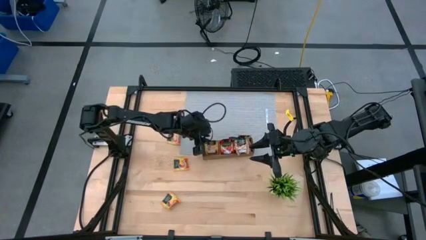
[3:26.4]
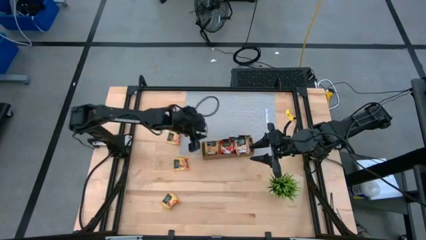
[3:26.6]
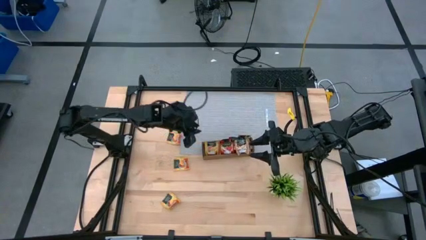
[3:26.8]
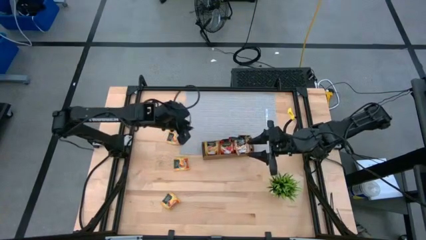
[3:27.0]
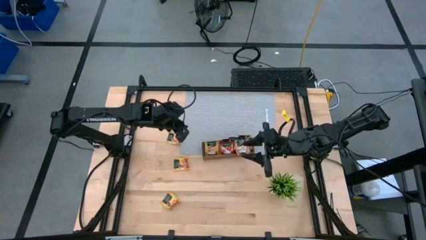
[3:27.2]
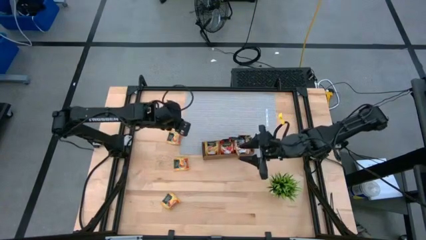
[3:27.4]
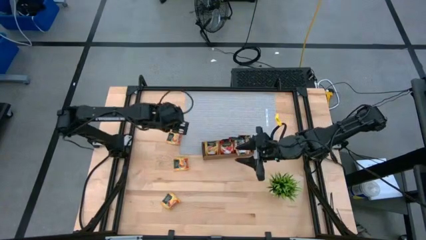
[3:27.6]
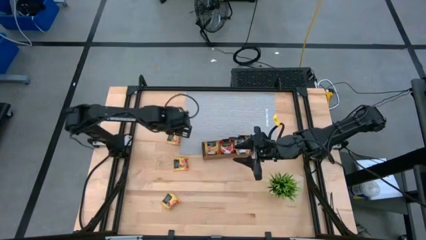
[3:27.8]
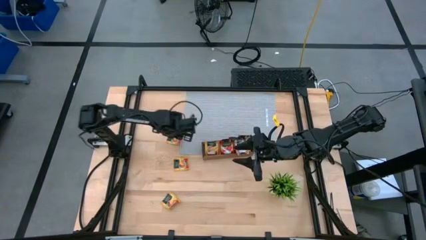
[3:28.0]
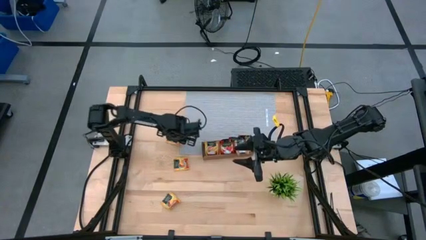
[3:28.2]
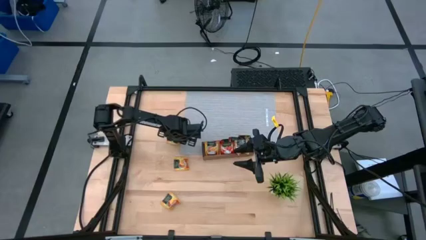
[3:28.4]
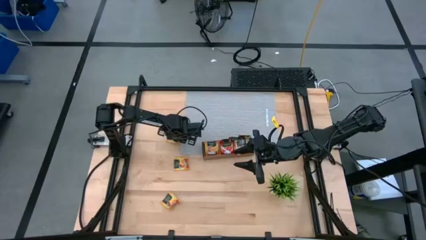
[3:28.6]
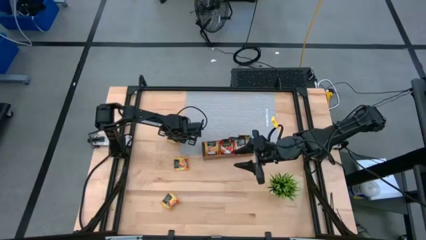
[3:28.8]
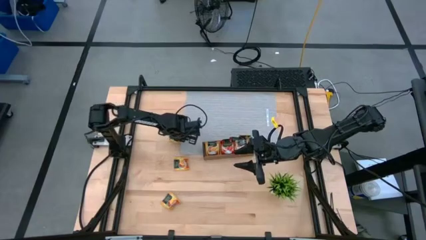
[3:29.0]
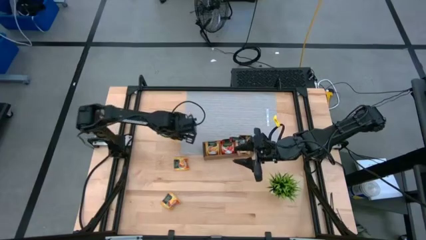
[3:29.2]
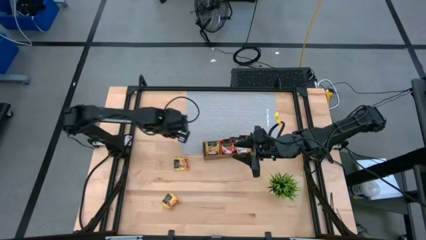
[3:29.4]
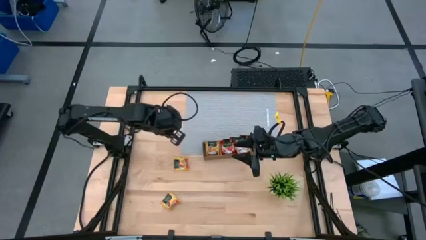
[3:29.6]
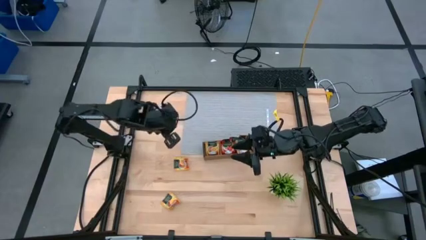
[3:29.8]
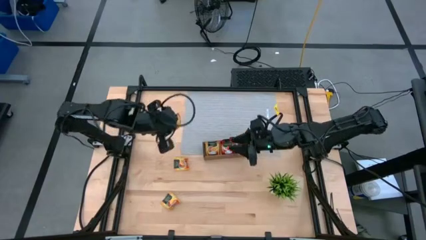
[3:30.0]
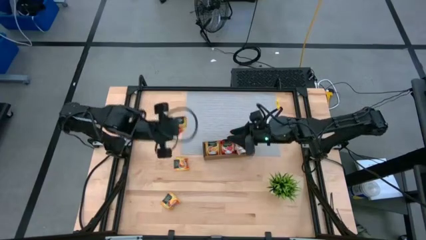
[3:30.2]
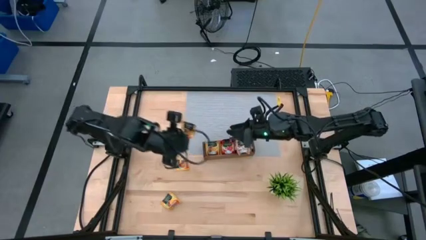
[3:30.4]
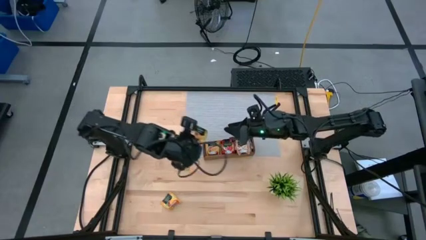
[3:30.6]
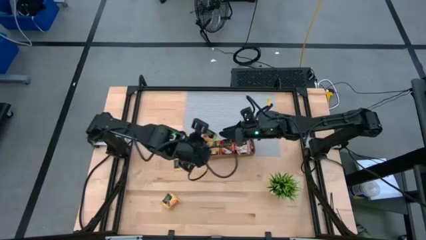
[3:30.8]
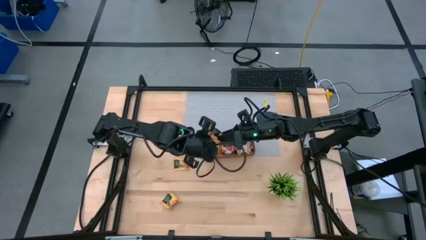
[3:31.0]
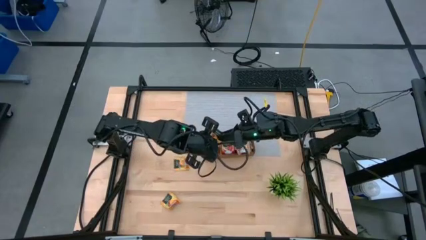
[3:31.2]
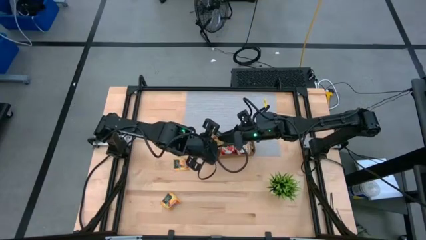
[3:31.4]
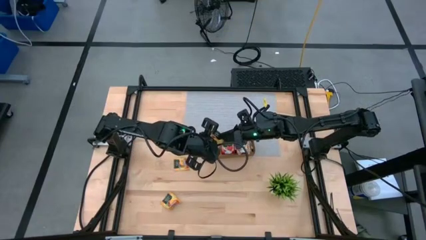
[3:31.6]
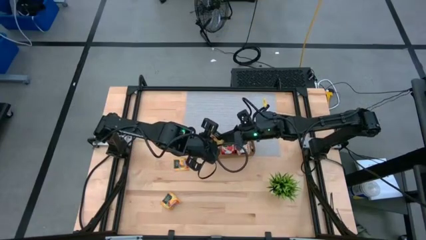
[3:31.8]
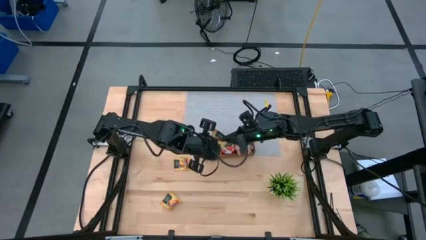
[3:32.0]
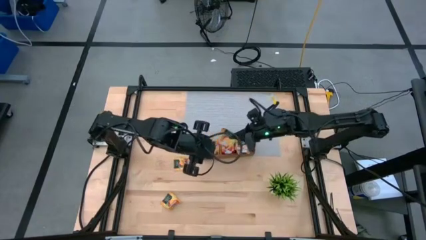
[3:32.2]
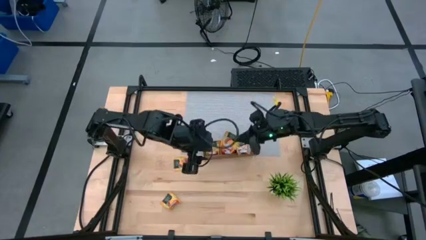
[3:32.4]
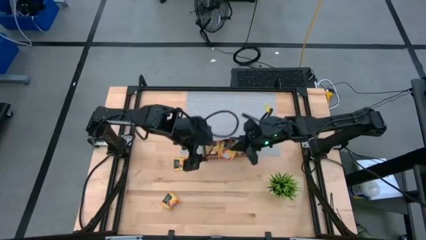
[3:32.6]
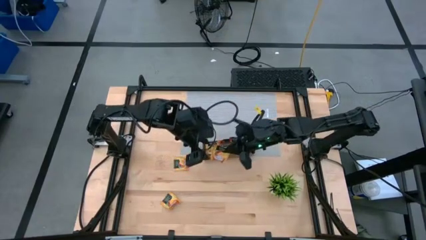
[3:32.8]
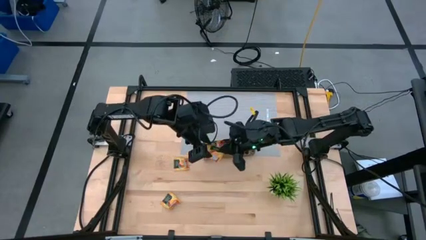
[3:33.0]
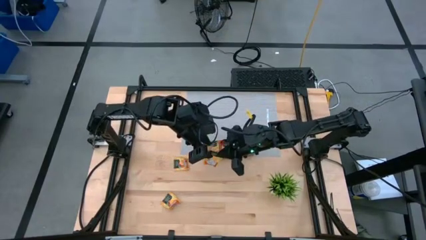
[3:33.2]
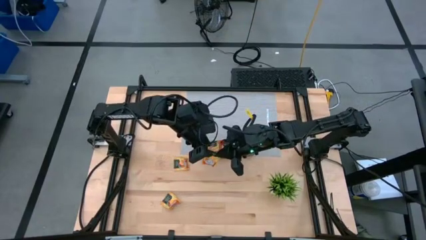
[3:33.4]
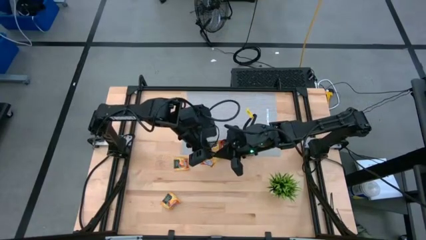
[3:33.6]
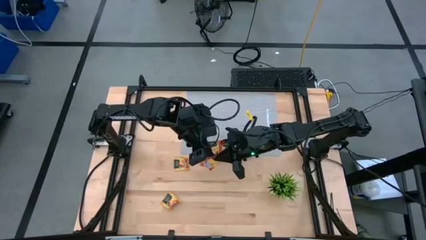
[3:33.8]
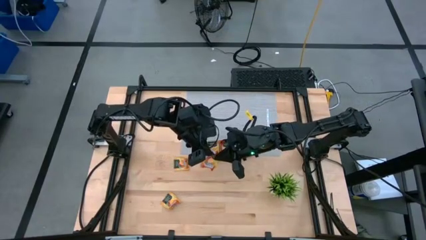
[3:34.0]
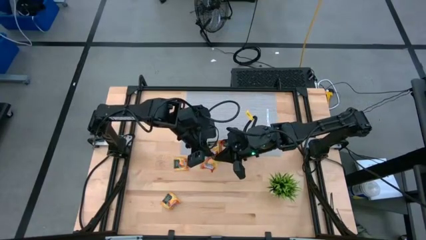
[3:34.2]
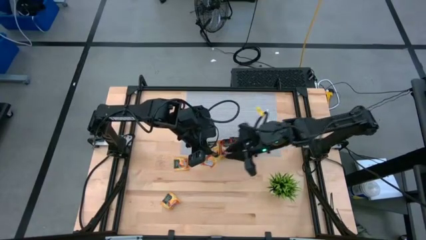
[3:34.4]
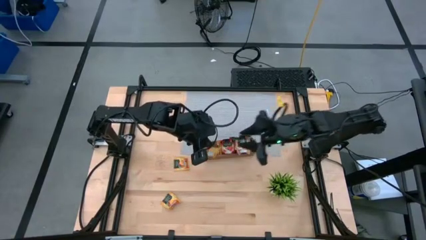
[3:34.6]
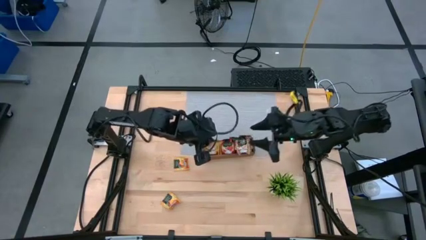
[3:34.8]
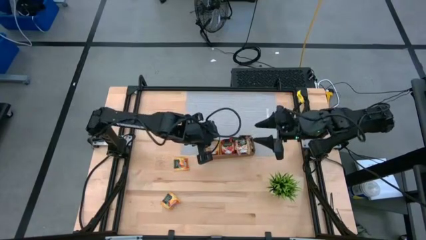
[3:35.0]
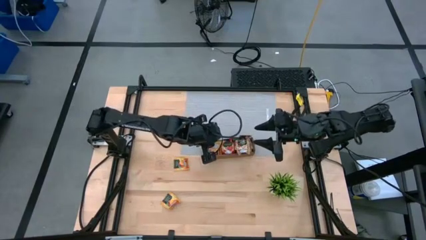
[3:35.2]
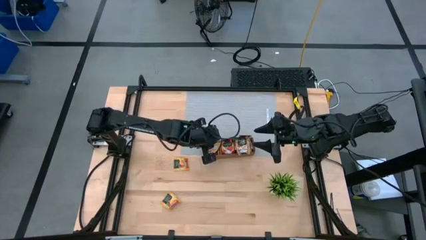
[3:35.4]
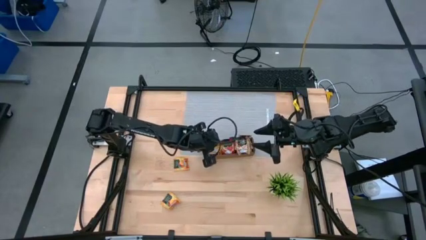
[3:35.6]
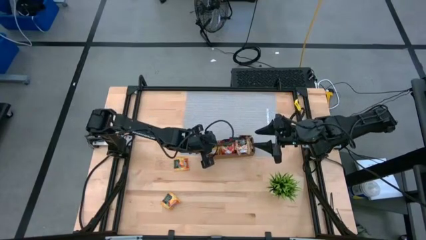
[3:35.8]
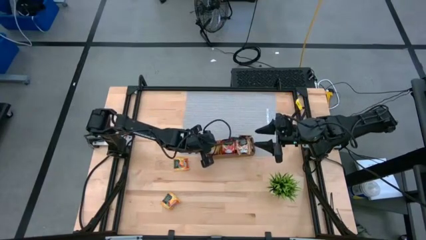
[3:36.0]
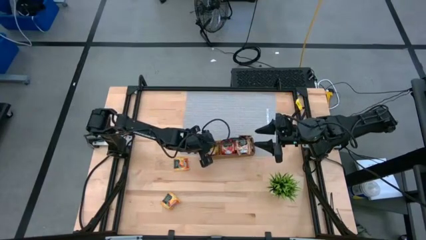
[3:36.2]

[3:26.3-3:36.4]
Task: Pick & Place Tea
Put the yellow tea bag into the left section of the wooden organizer

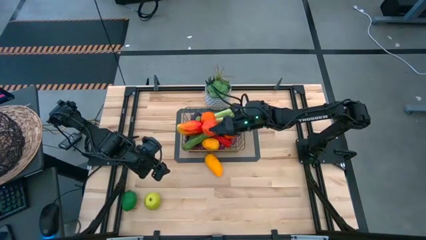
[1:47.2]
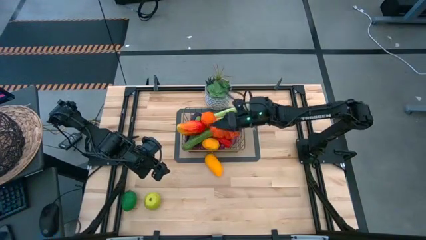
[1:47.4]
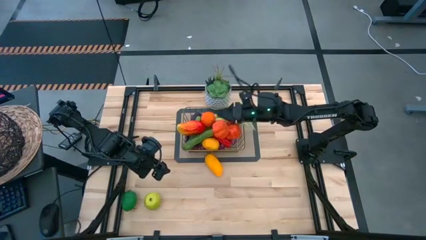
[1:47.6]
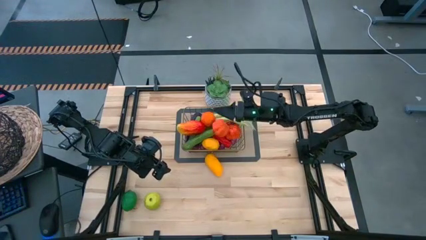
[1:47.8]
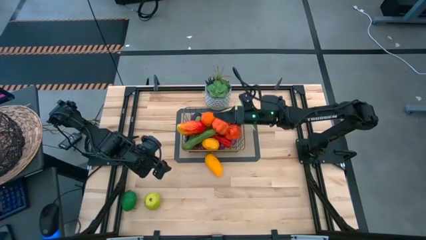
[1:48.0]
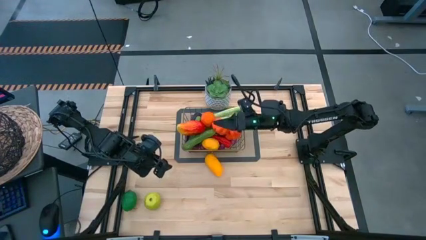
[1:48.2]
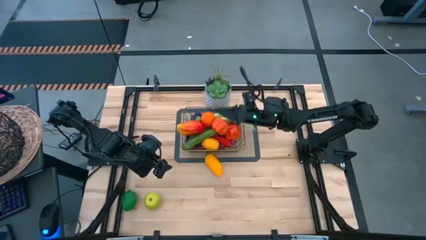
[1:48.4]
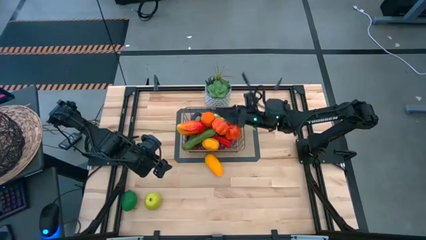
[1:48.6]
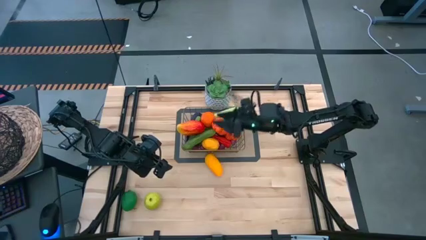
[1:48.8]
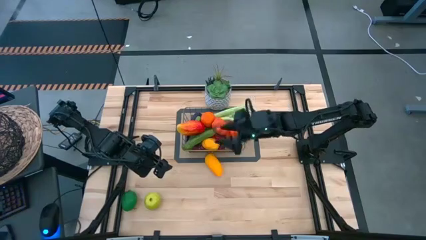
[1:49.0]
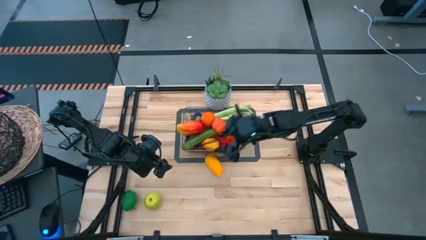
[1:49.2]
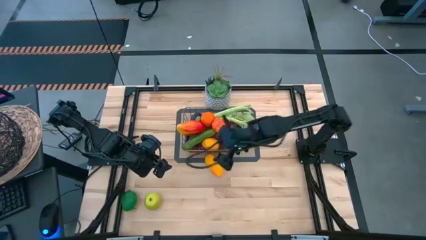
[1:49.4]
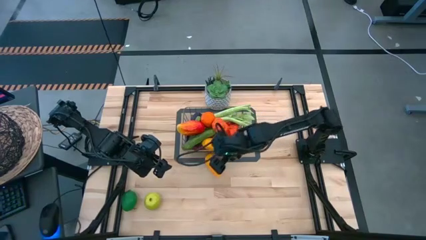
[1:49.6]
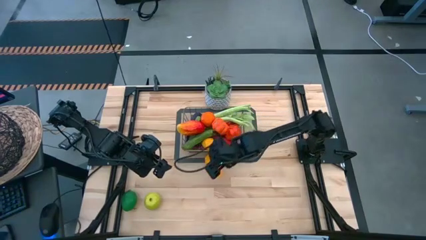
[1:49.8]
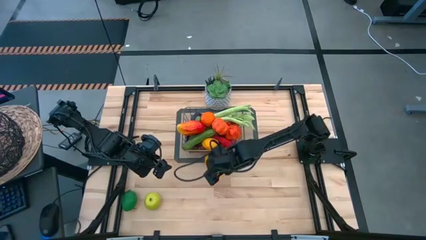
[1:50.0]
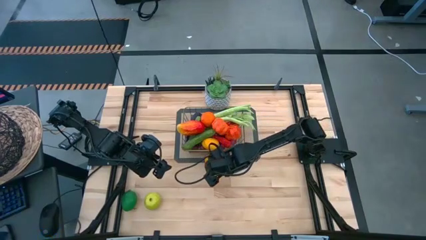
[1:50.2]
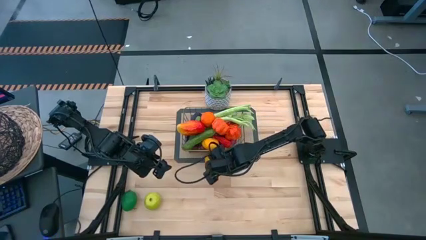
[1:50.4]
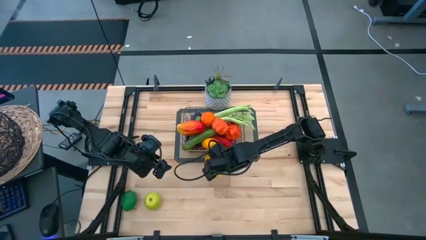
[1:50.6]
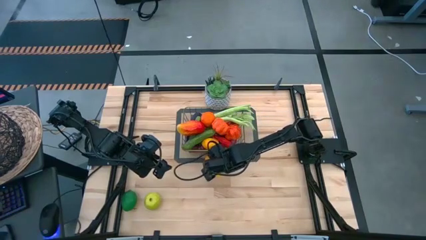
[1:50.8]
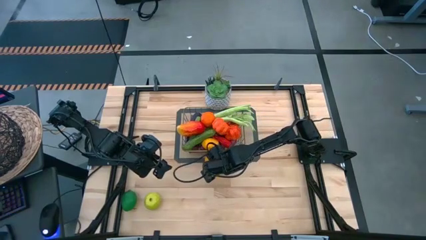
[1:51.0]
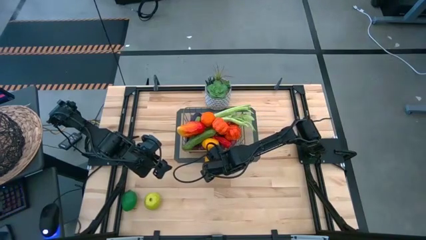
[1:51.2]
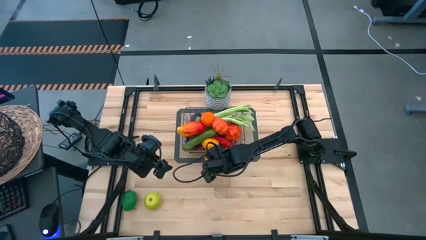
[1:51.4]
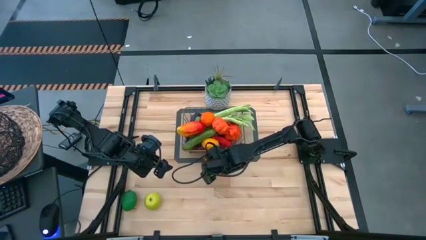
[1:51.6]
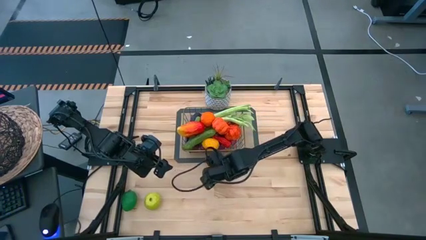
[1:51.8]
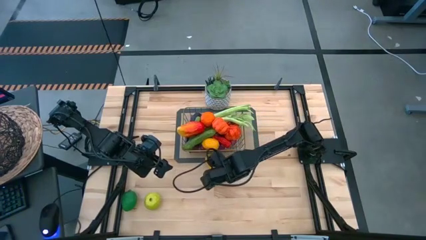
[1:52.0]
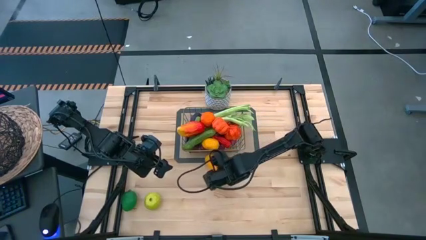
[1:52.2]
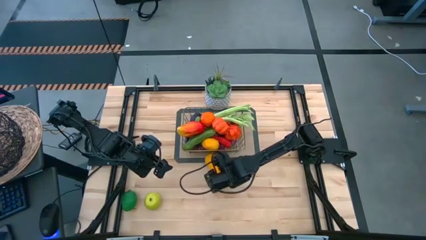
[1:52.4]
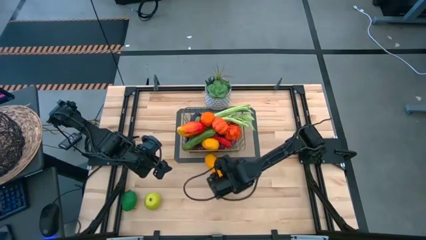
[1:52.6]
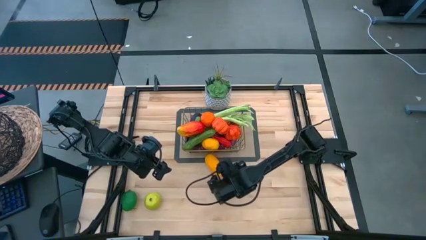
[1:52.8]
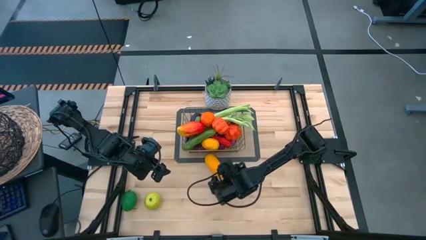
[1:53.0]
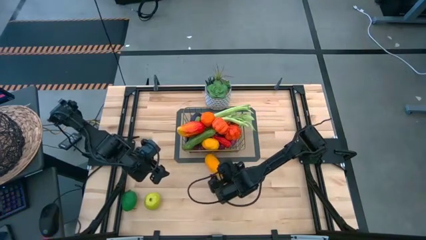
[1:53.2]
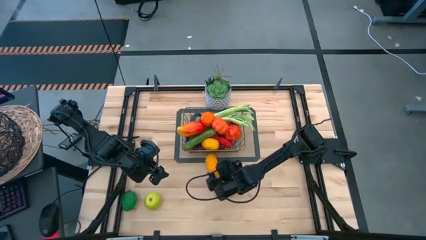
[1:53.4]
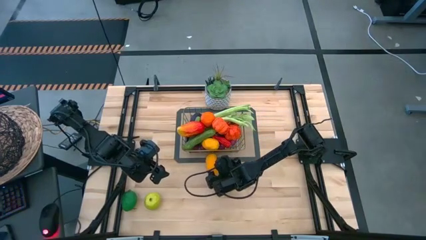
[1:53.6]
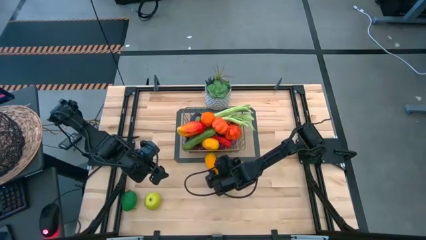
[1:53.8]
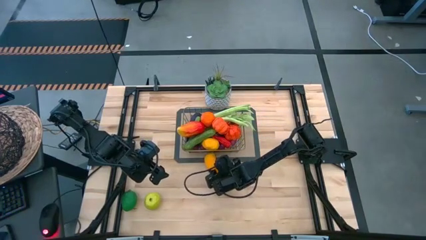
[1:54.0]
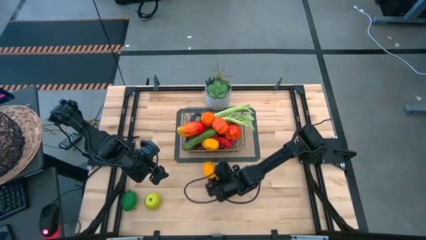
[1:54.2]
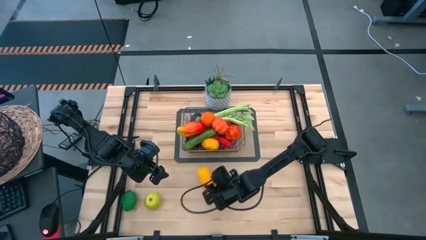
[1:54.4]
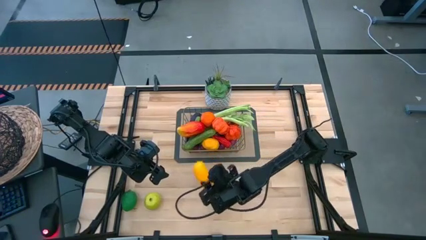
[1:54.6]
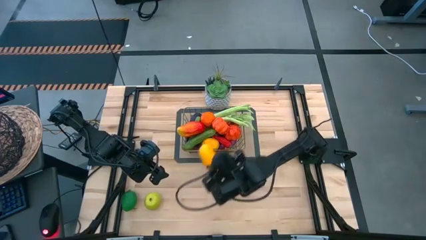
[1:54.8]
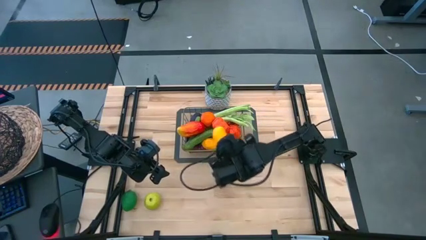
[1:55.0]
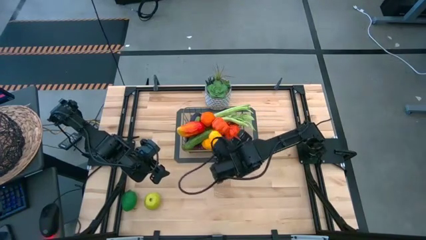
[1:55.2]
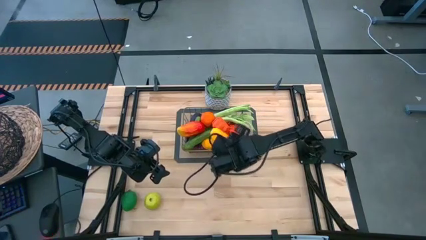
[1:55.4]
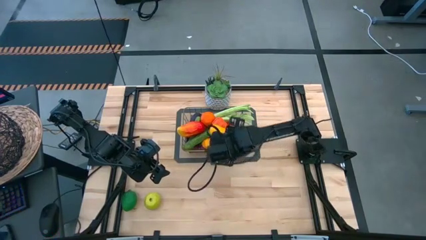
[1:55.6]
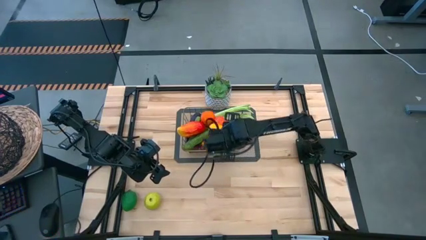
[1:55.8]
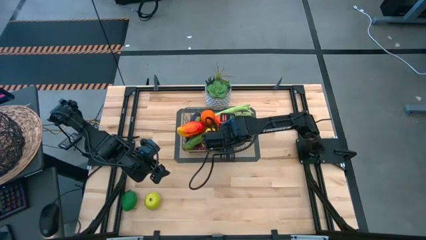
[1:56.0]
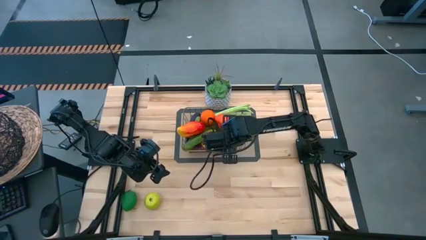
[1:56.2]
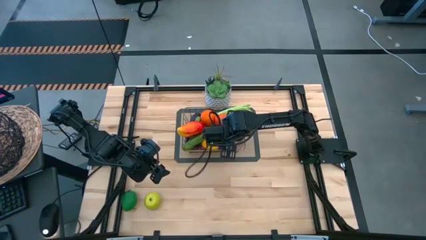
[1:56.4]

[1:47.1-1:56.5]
Task: Build produce basket
Put the yellow mango into the wire basket
